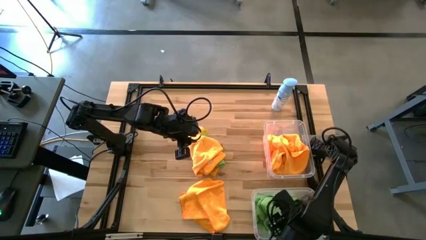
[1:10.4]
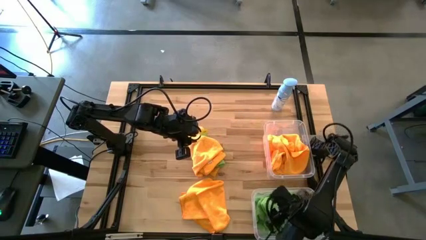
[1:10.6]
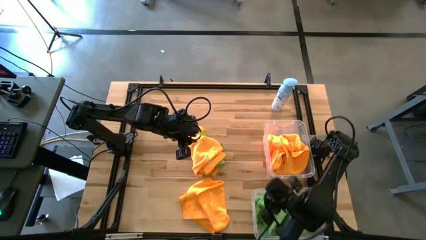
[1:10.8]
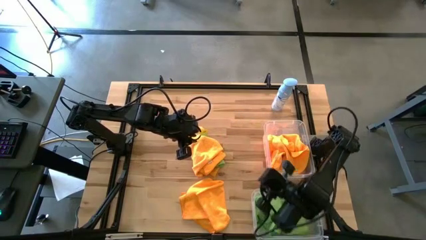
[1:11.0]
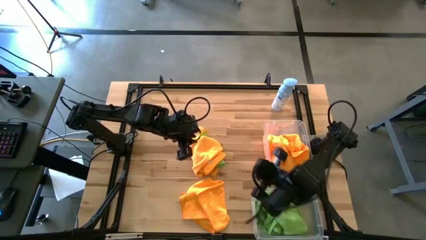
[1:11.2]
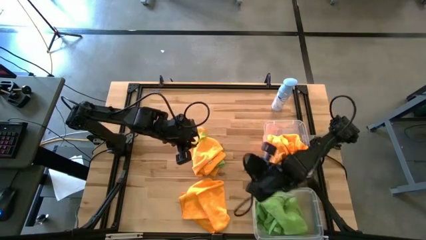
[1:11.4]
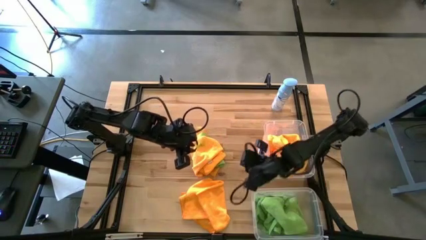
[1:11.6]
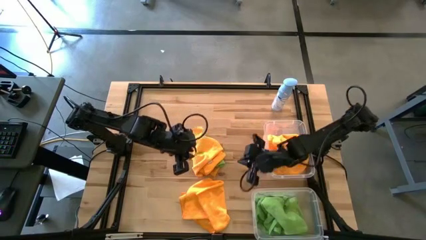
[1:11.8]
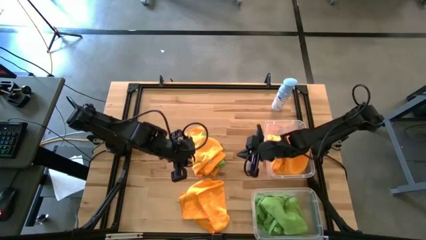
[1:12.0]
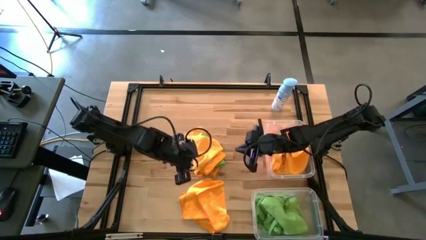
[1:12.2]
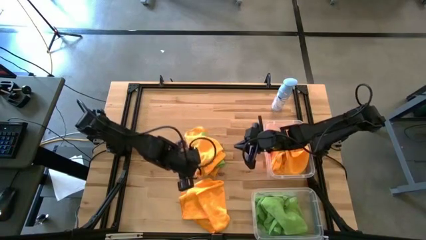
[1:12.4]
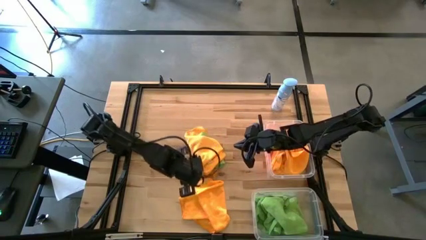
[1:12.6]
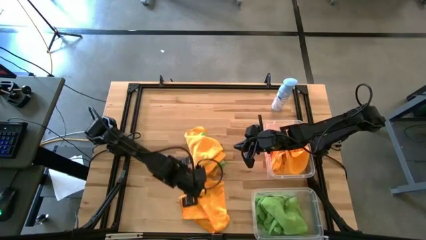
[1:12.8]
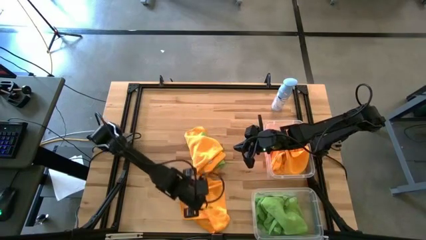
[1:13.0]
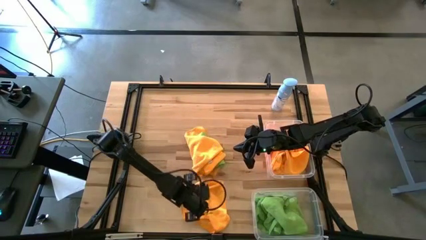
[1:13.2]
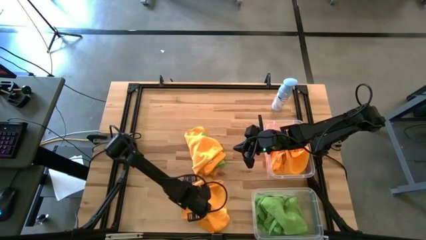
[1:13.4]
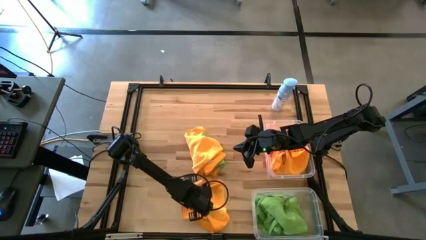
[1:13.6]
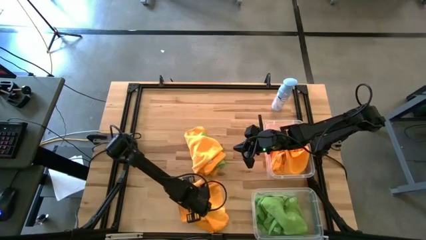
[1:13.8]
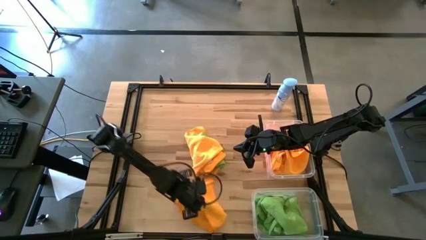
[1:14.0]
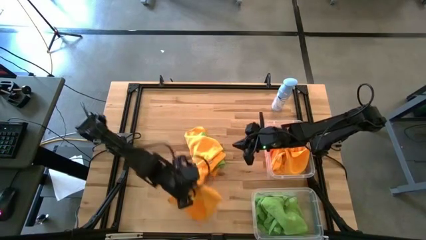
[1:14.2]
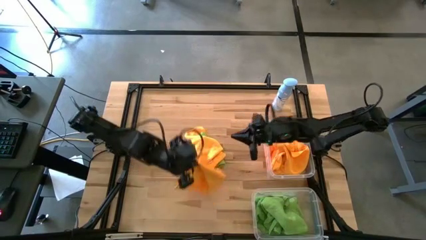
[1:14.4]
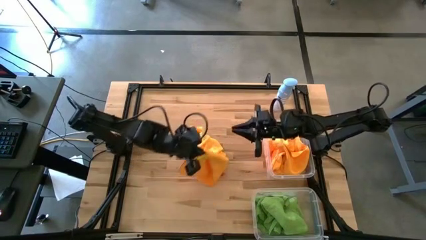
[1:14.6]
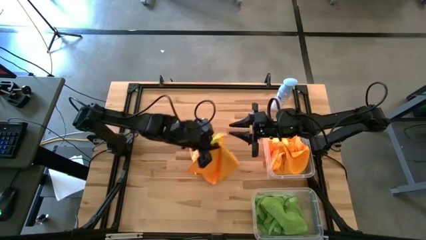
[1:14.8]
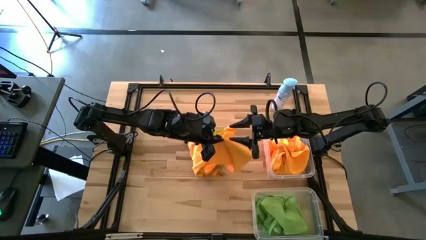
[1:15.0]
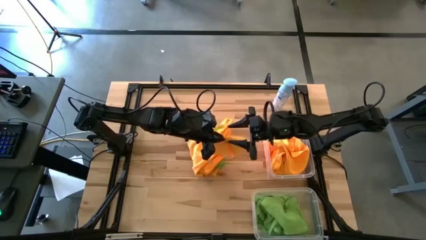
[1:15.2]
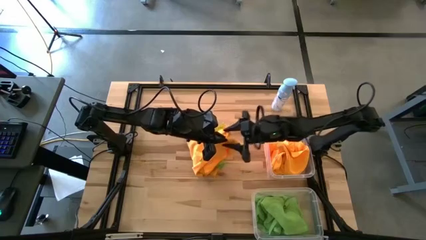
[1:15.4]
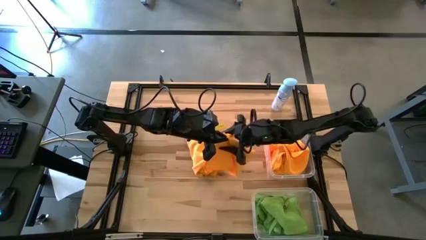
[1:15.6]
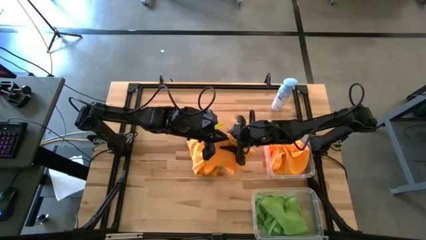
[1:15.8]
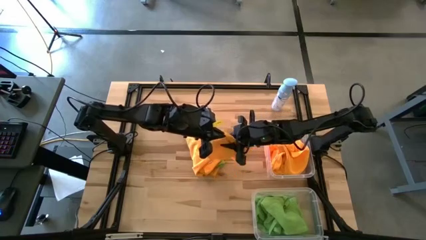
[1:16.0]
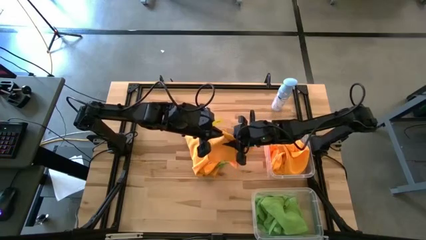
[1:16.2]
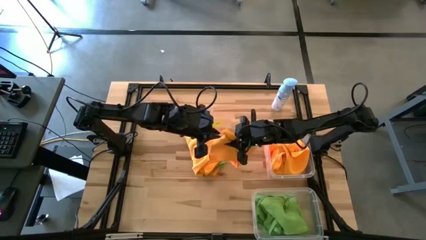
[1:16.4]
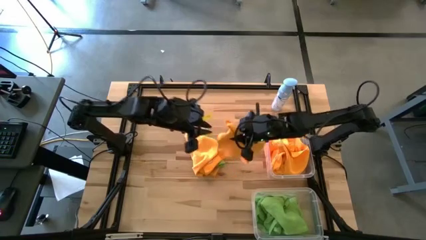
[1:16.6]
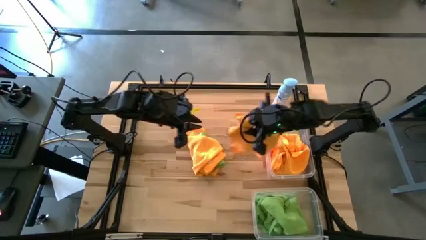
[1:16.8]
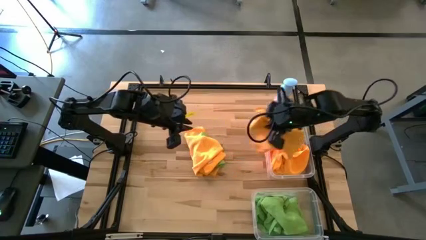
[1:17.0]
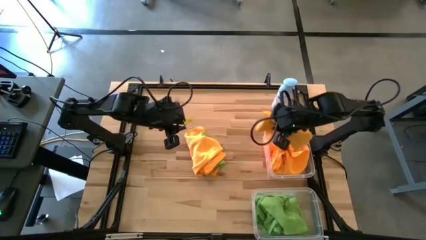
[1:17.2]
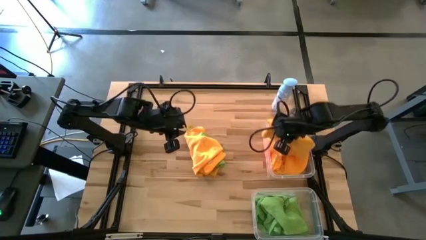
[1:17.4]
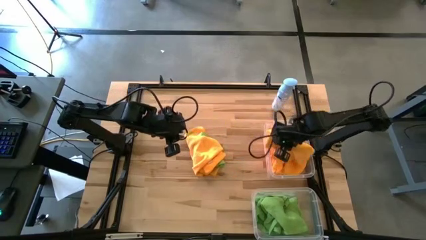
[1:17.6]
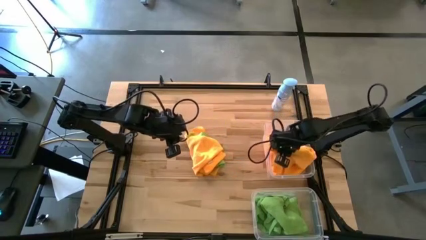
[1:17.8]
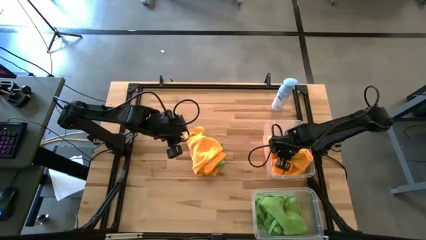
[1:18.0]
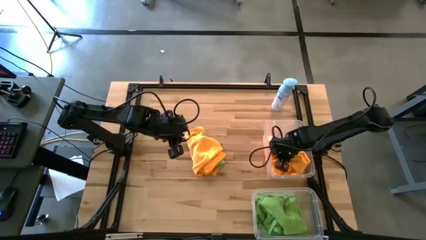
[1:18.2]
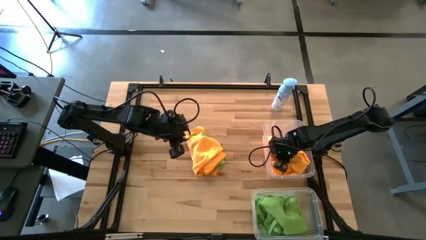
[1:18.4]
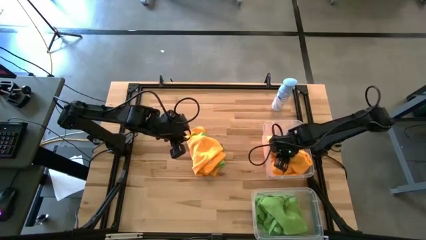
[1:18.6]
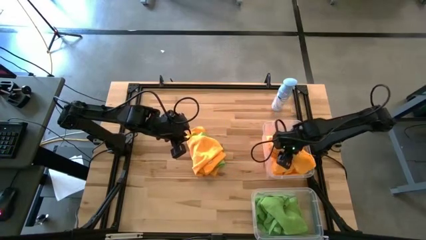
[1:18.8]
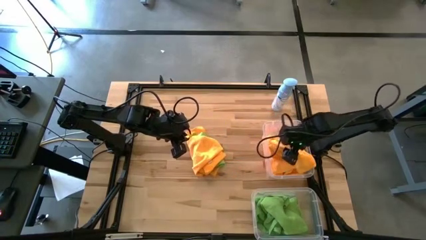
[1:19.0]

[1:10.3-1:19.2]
Task: Sort microfiber towel by color & place in baskets
Put the yellow towel into the top transparent bin

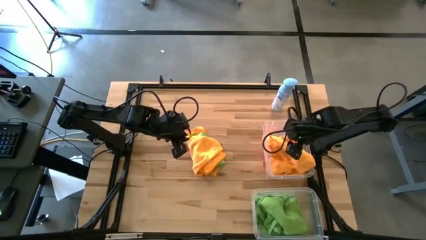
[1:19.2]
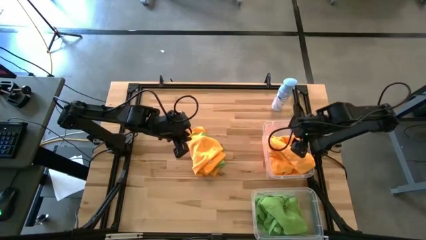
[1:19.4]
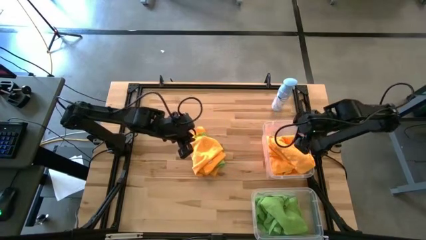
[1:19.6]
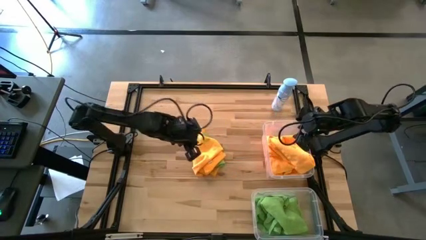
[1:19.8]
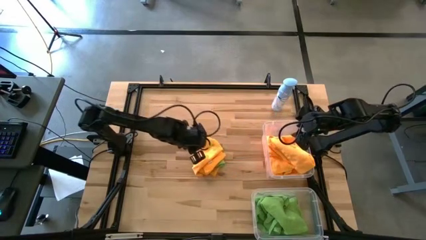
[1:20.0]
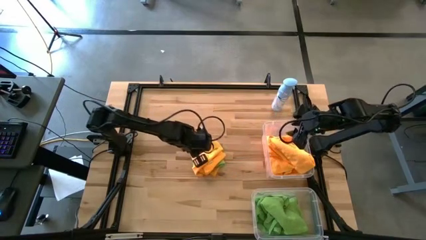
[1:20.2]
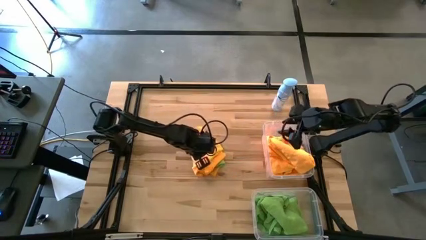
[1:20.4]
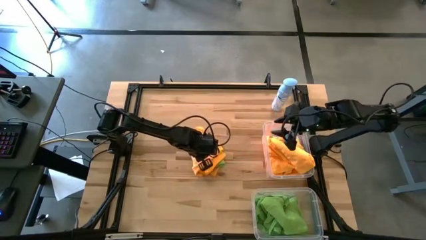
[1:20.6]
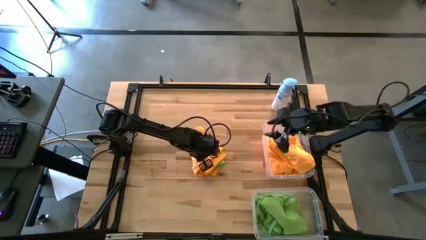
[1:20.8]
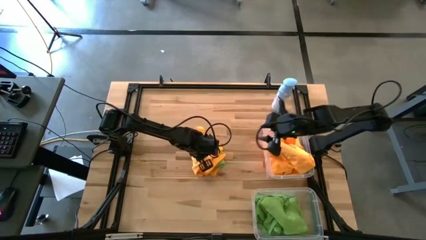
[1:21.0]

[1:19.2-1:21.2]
Put the yellow towel into the top transparent bin

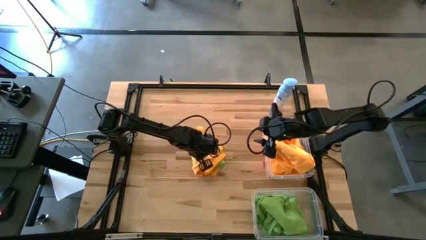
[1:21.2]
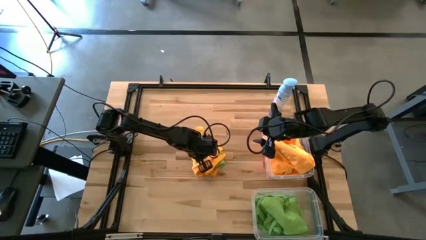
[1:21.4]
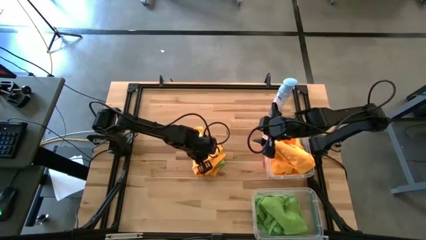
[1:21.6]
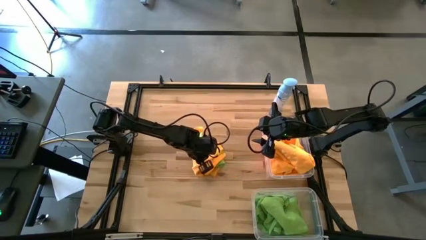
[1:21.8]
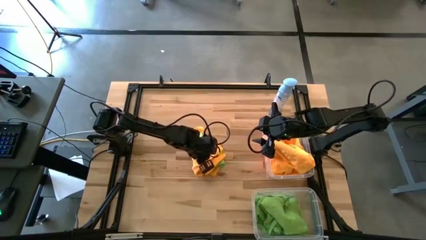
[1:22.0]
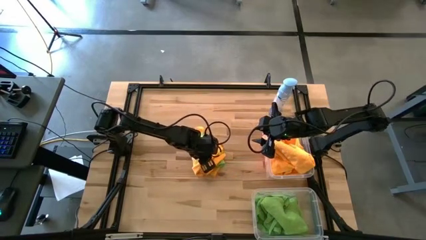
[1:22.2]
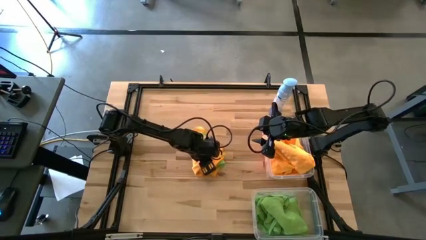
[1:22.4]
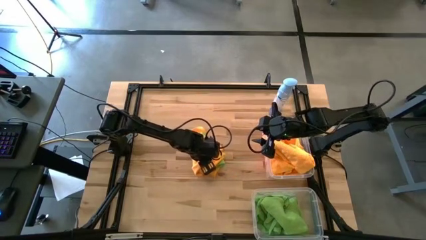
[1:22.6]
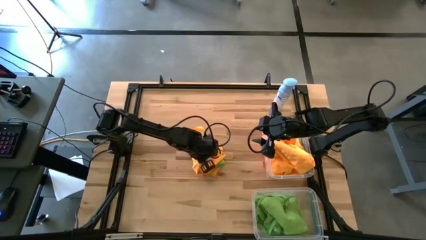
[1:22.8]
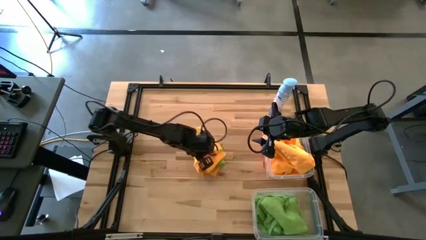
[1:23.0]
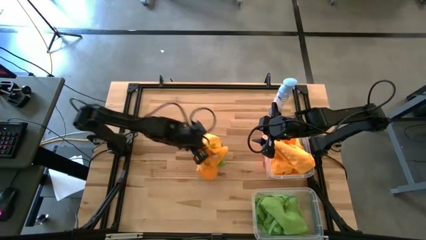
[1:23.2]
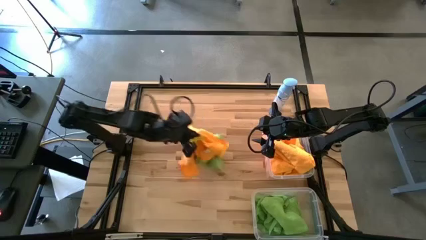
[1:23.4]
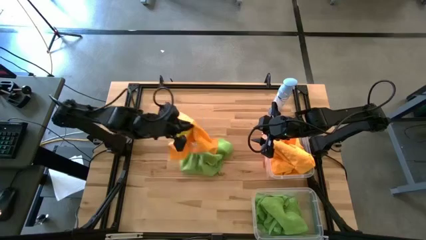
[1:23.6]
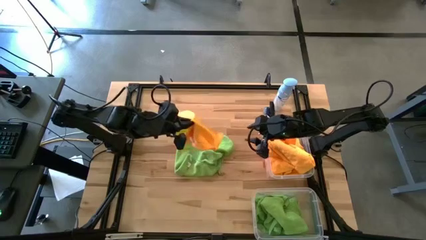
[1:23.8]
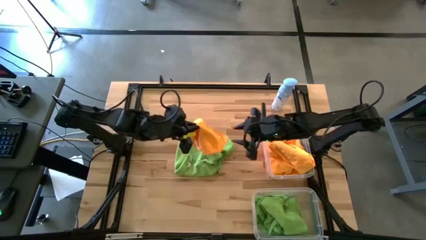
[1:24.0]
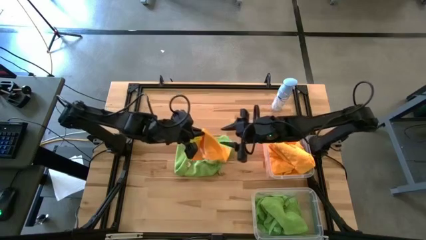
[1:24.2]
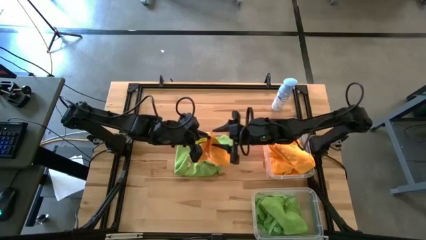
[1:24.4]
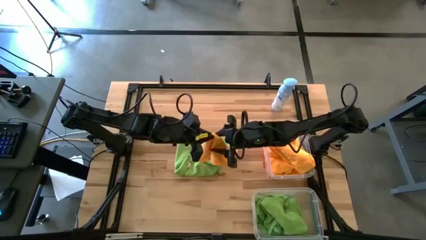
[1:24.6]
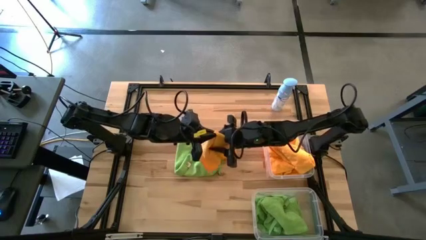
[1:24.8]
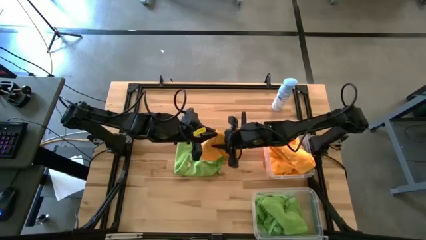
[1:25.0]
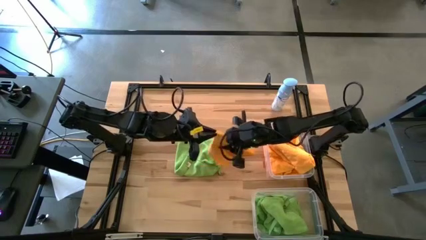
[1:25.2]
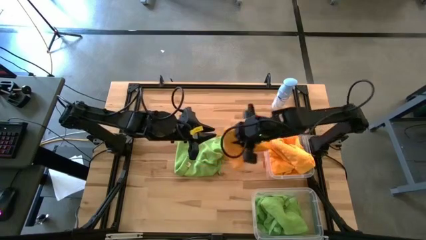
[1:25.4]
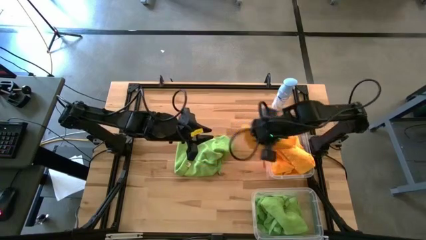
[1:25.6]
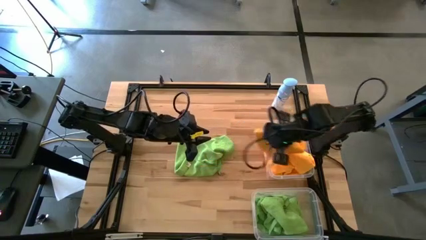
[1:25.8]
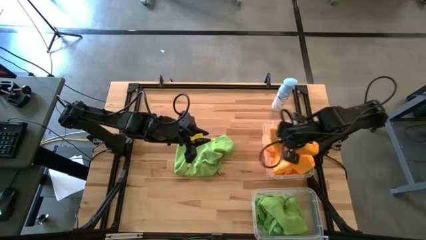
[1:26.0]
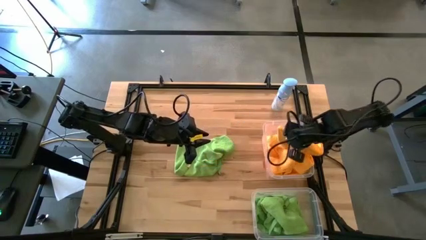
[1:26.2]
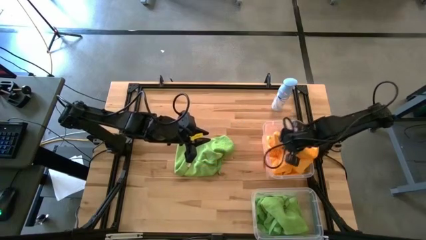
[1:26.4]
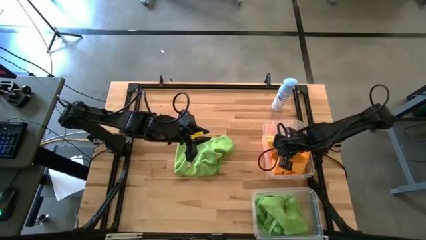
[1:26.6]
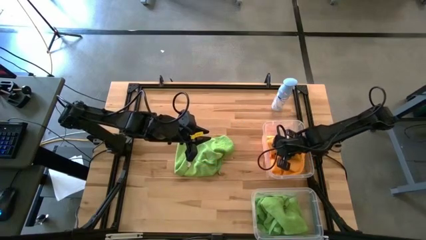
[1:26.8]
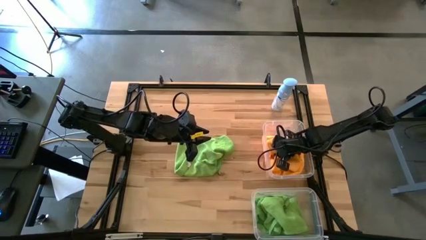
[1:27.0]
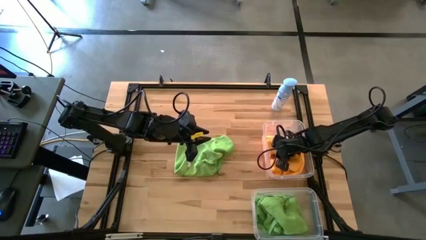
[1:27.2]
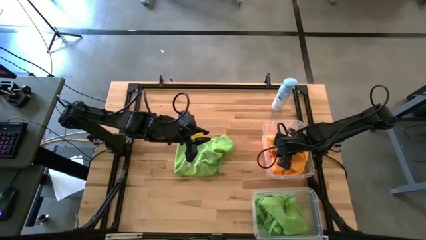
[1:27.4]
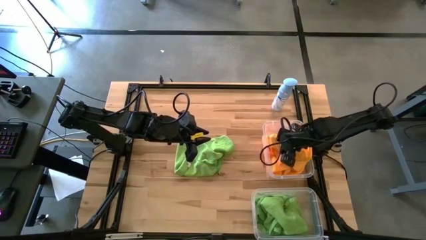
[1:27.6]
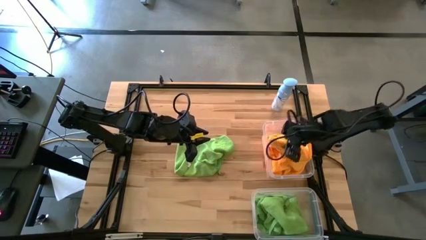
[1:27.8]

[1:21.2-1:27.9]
Put the yellow towel into the top transparent bin

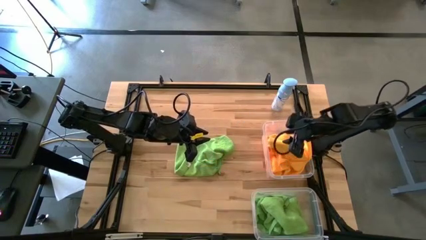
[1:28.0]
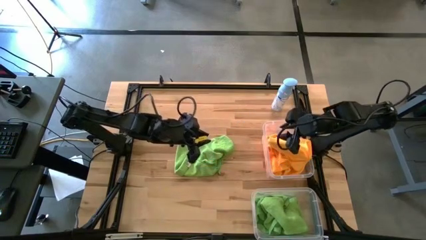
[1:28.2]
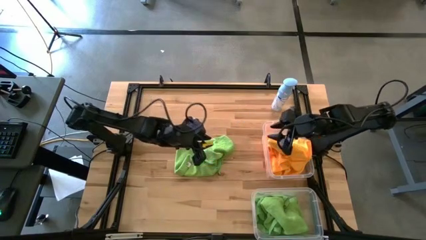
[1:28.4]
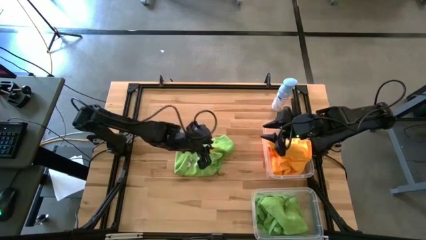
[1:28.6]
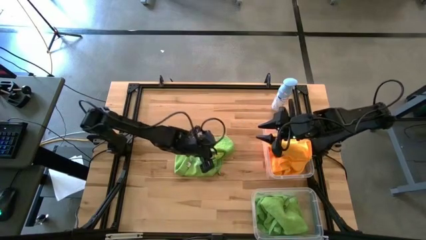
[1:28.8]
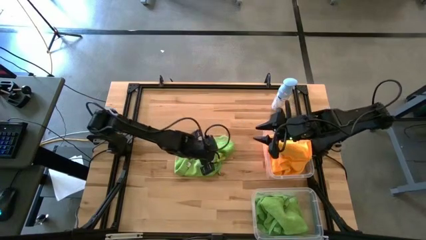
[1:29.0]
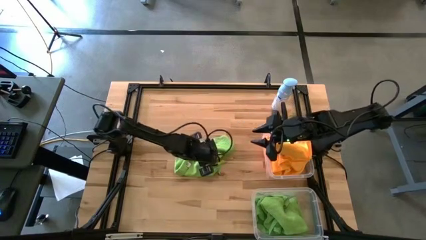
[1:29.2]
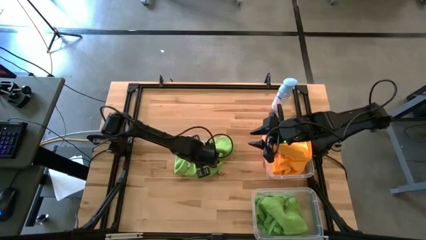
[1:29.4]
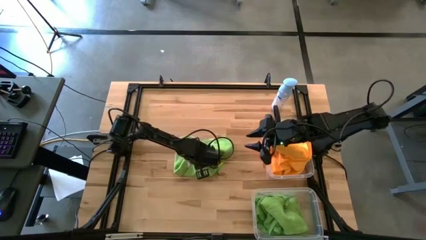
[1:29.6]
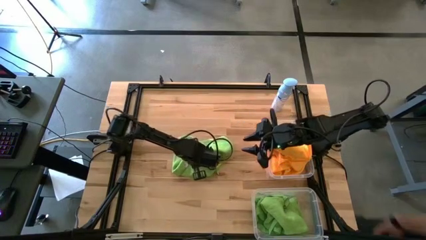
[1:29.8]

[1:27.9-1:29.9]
Put the green towel into the bottom transparent bin
